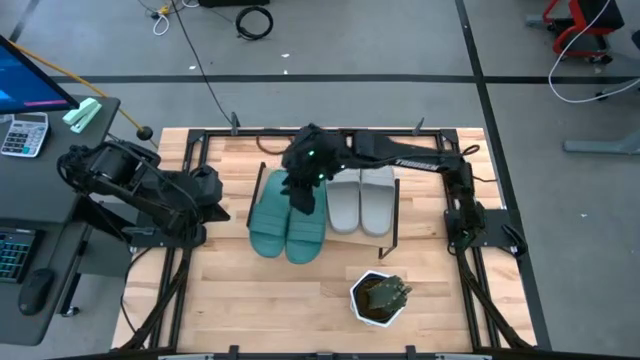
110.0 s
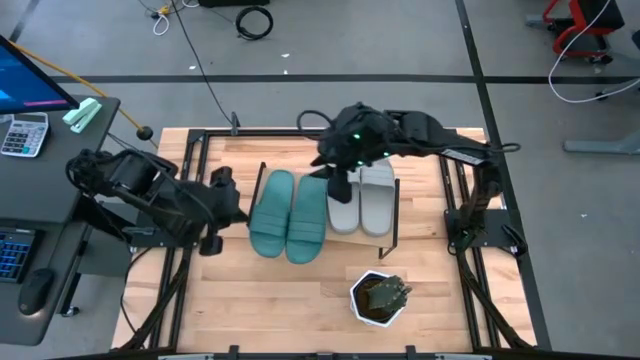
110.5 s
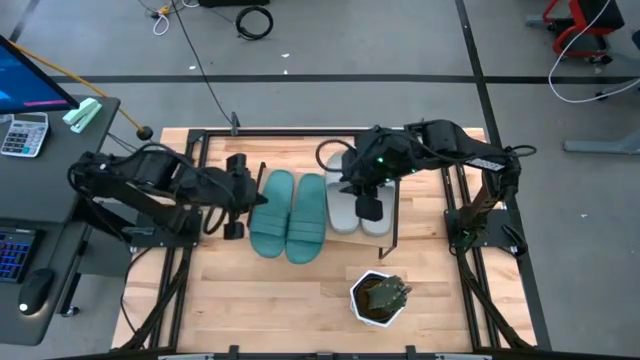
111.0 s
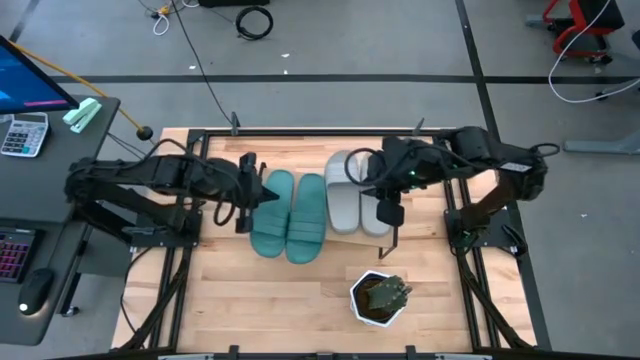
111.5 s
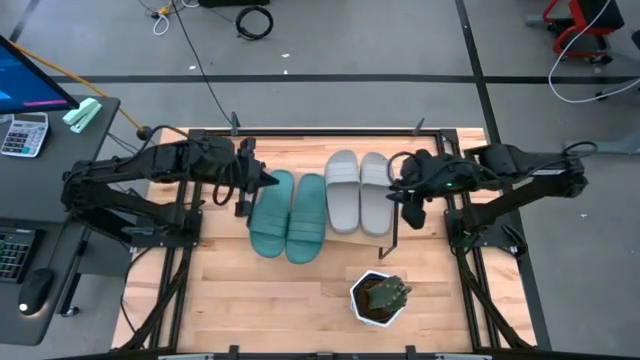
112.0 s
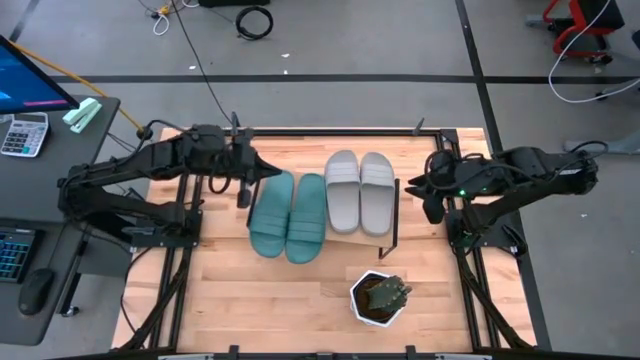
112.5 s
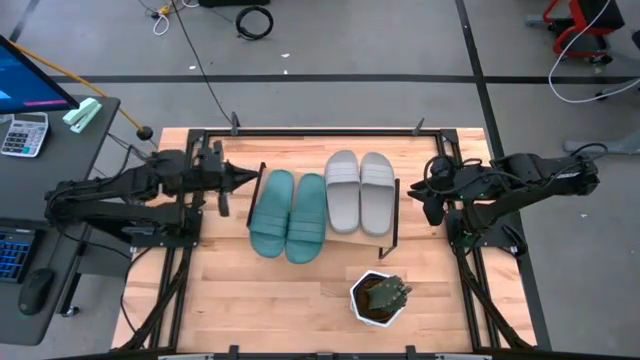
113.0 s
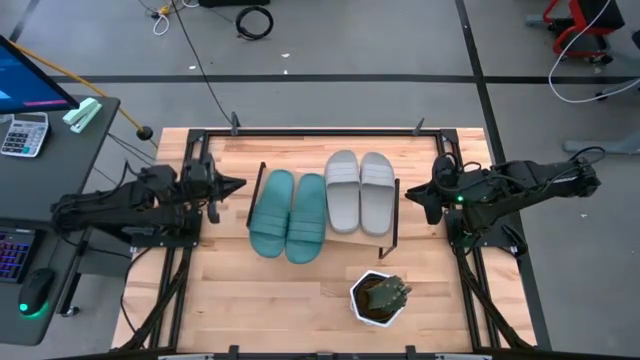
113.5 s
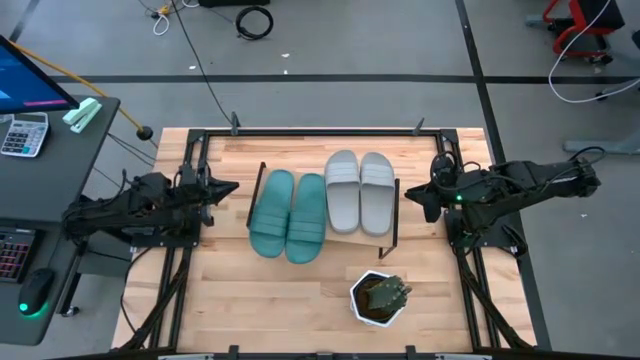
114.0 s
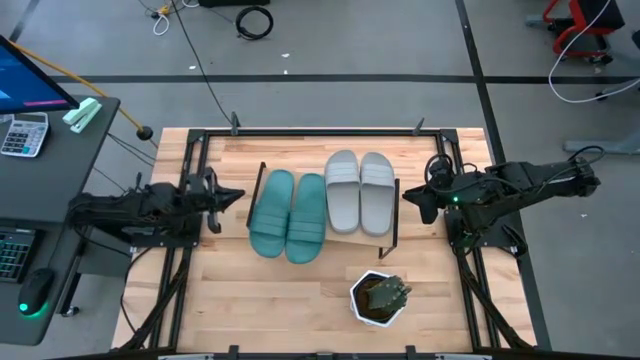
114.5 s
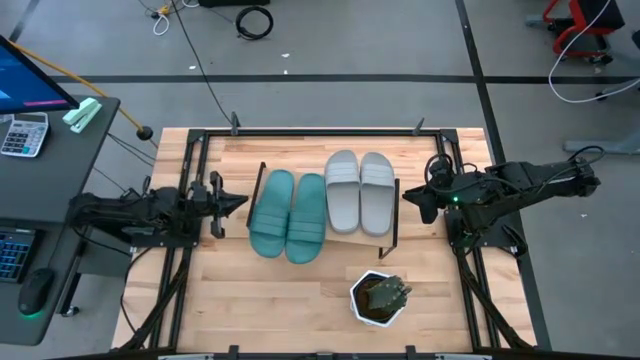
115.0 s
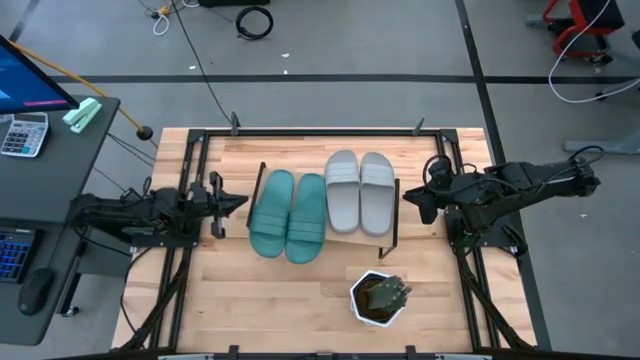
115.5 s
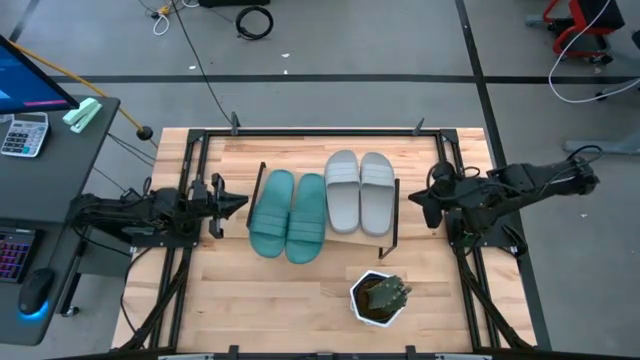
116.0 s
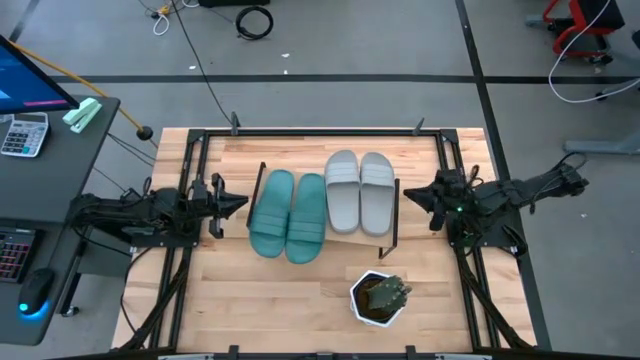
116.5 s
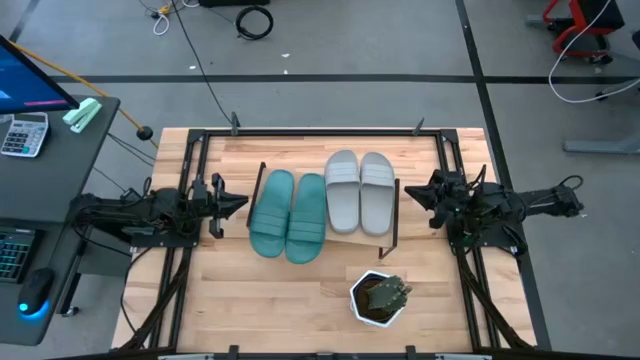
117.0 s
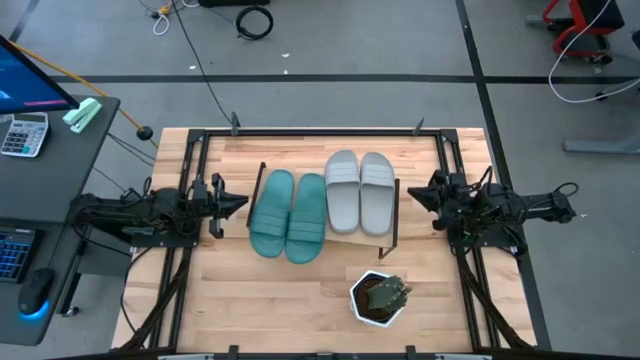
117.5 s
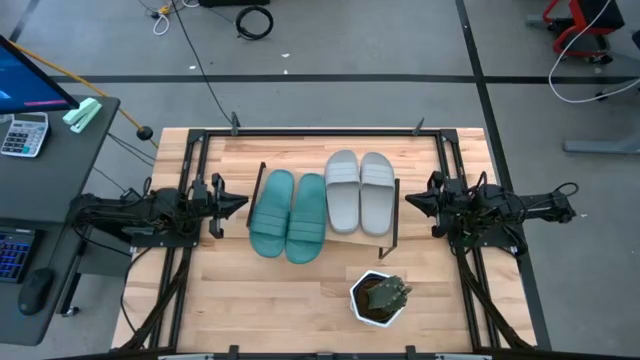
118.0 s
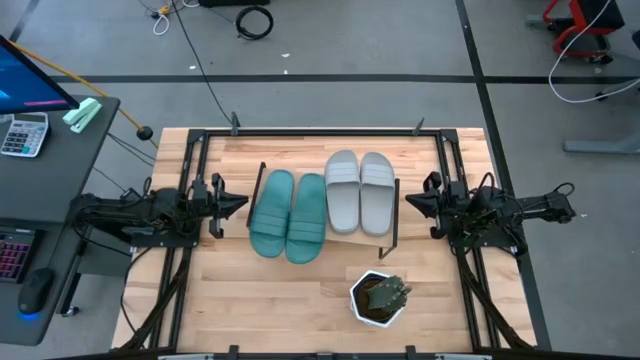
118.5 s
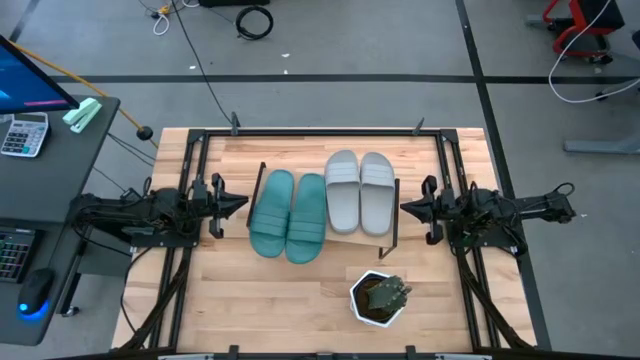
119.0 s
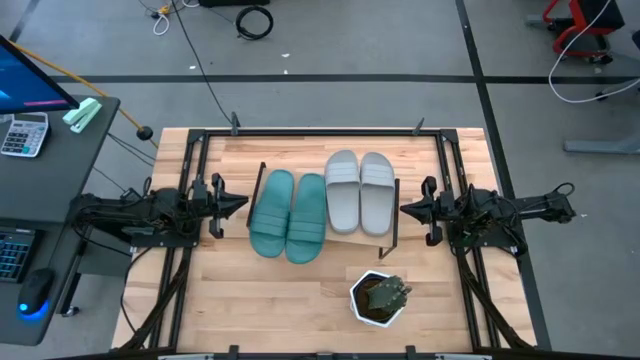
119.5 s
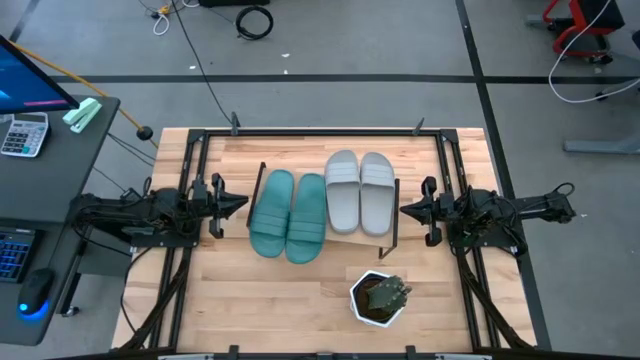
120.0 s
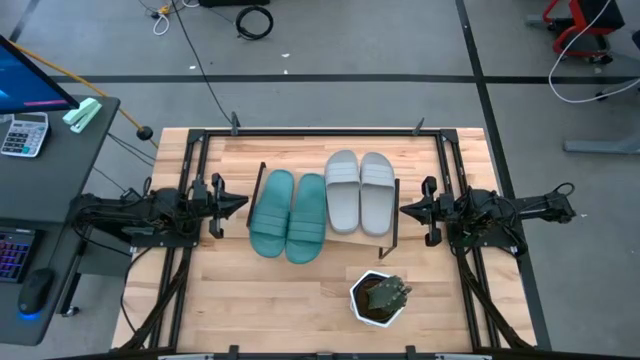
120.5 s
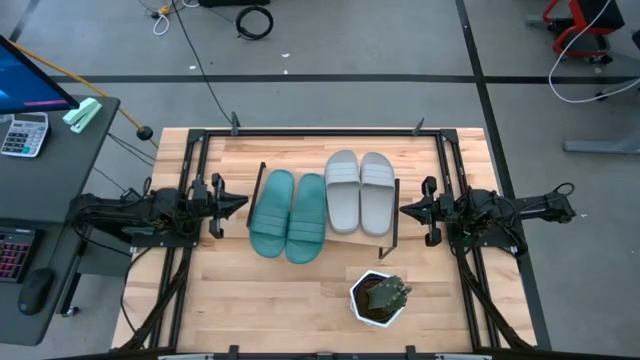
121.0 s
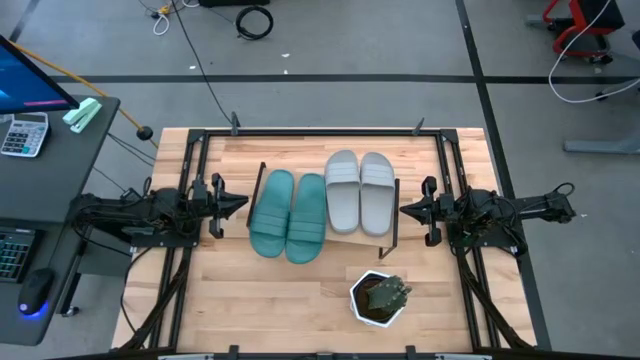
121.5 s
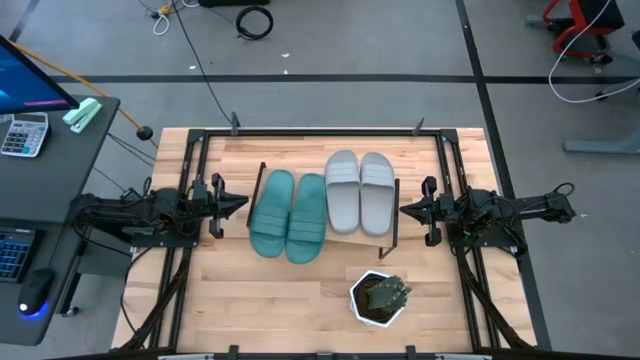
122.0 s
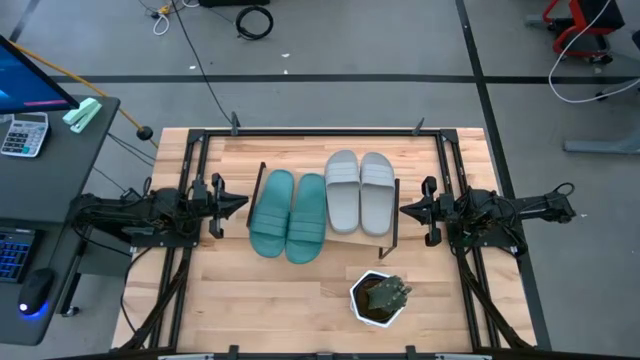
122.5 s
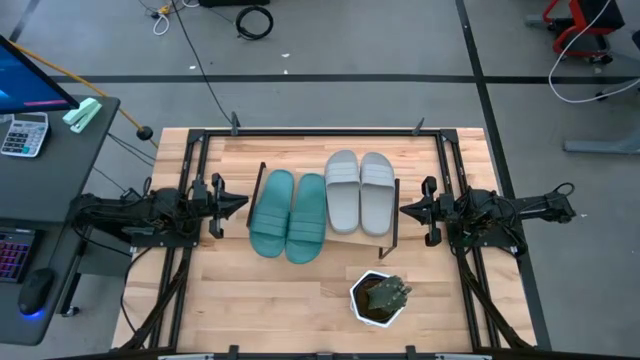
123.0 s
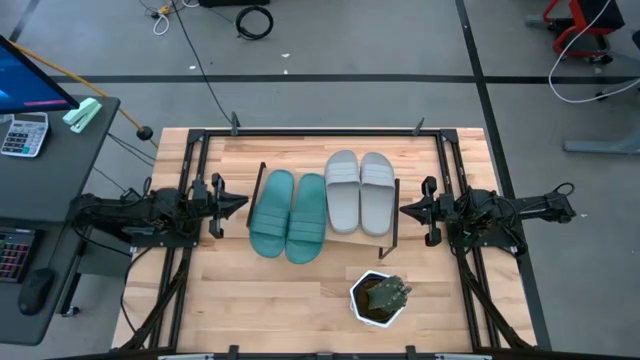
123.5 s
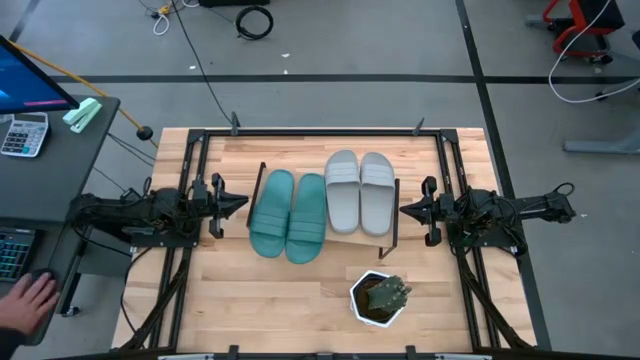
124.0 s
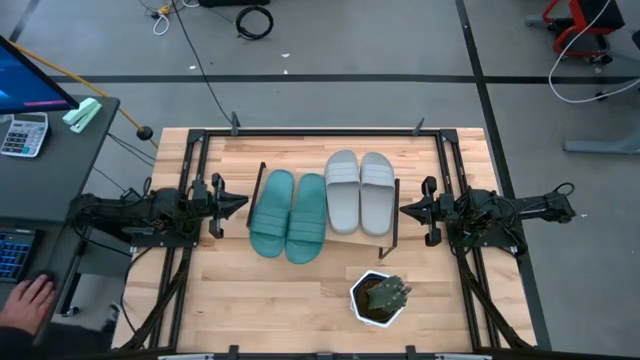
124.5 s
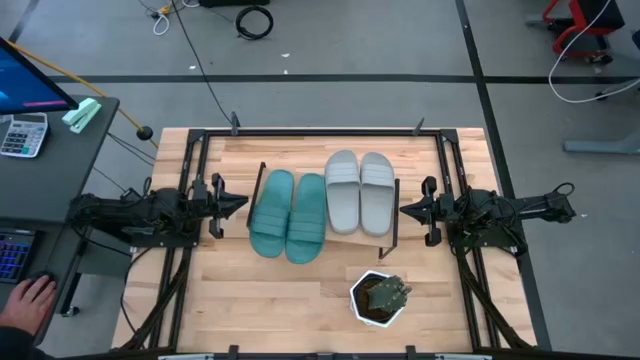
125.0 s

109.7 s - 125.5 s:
Task: Pick and place slides into the shelf
Return to Home Position

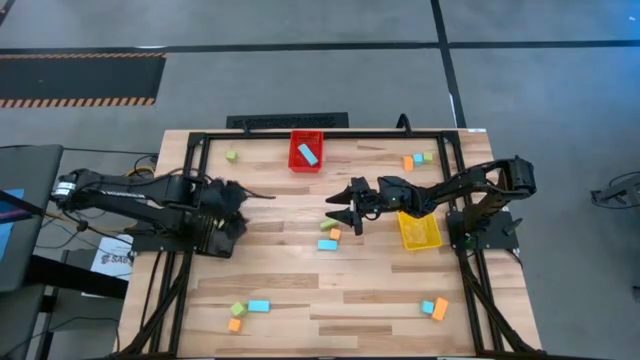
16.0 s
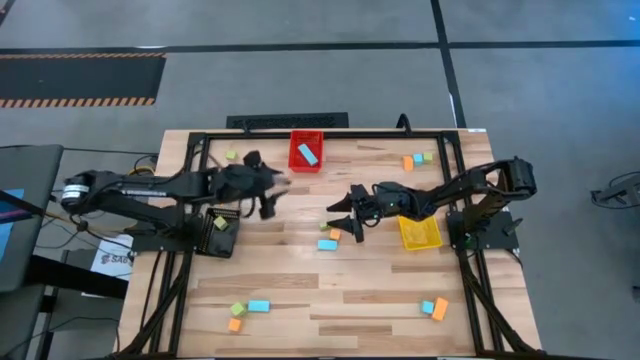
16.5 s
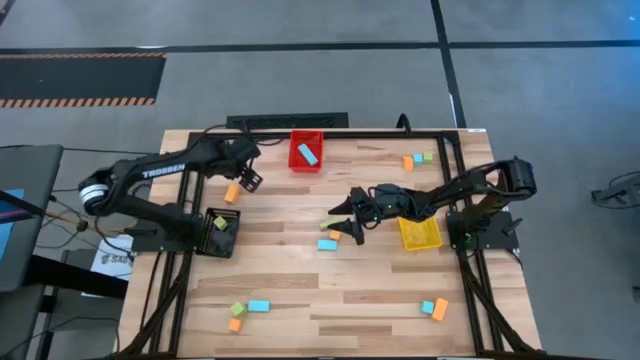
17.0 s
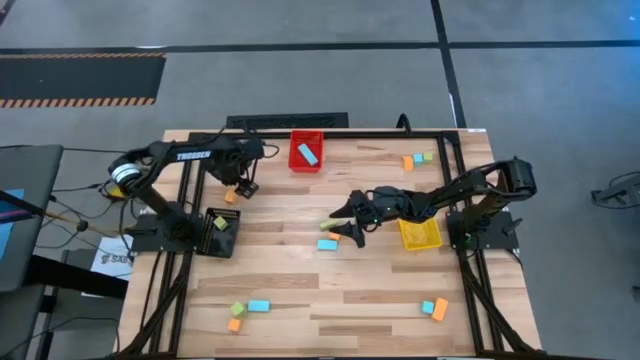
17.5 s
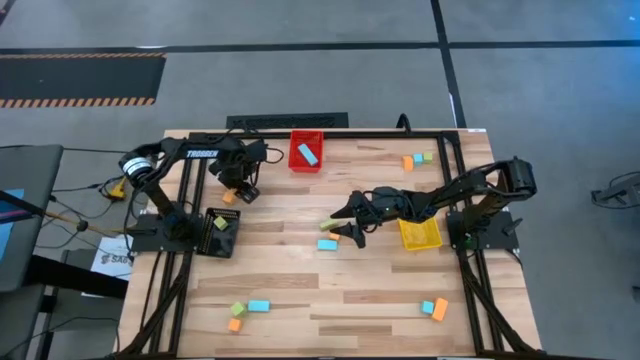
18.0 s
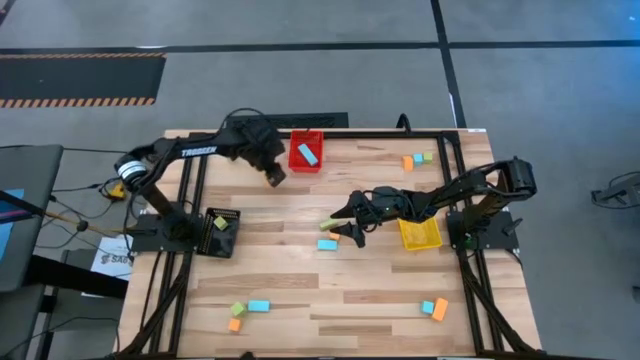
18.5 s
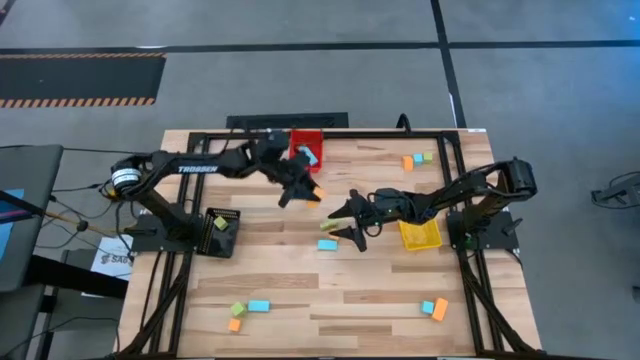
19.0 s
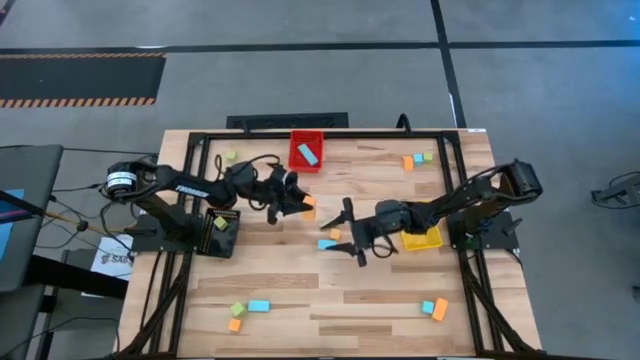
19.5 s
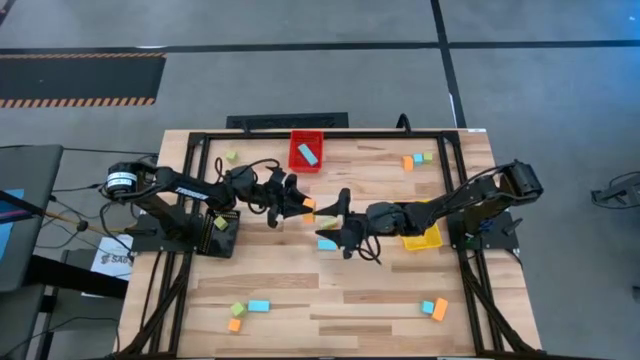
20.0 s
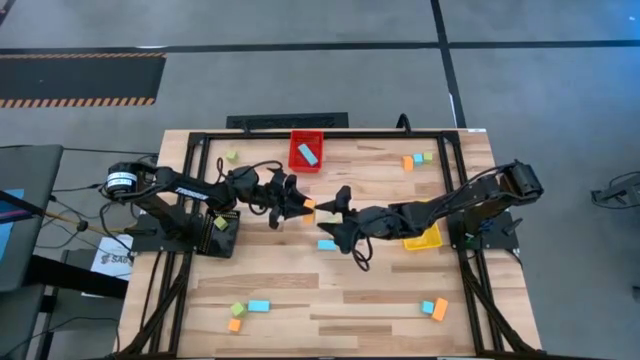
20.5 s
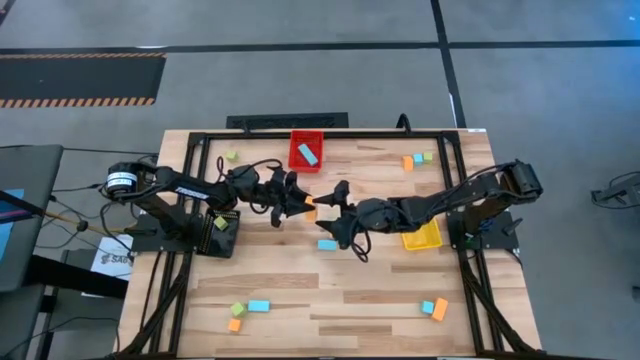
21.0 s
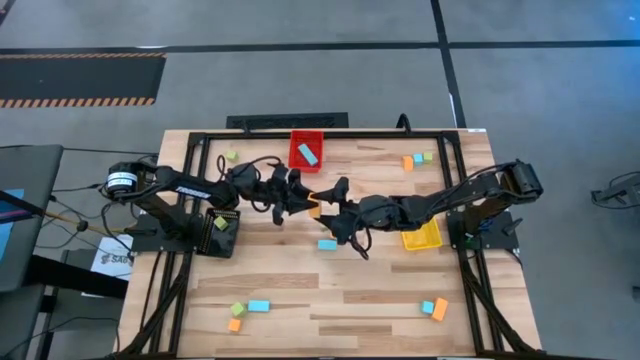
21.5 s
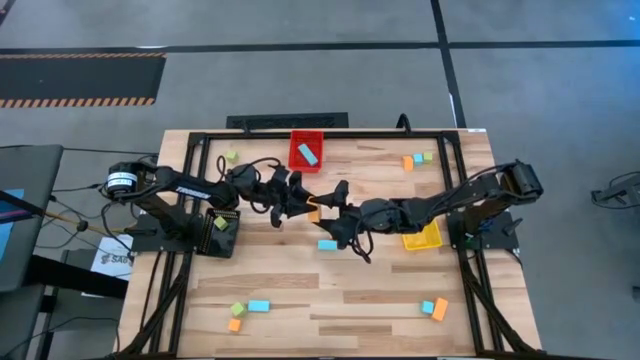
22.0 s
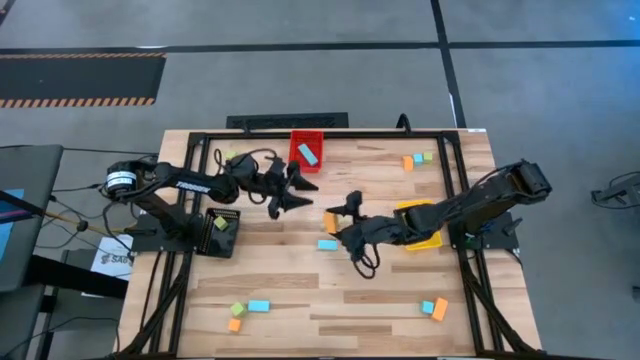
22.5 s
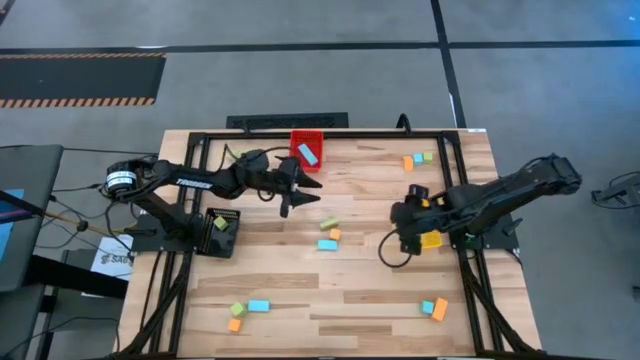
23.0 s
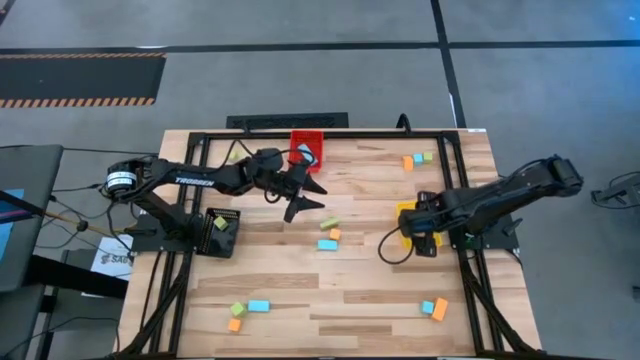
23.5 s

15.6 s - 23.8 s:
Task: Sort & place blocks by color
Put the yellow block into the yellow bin
